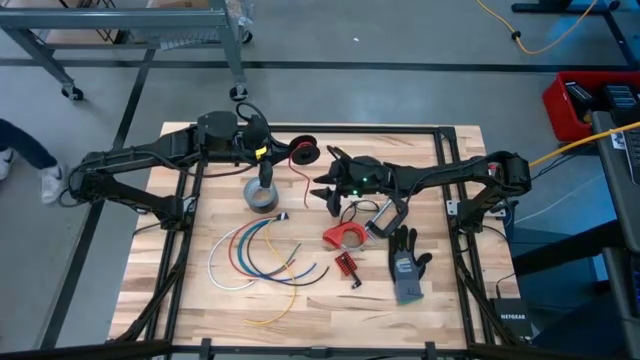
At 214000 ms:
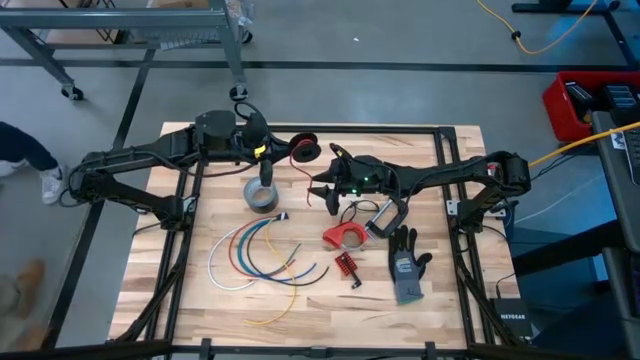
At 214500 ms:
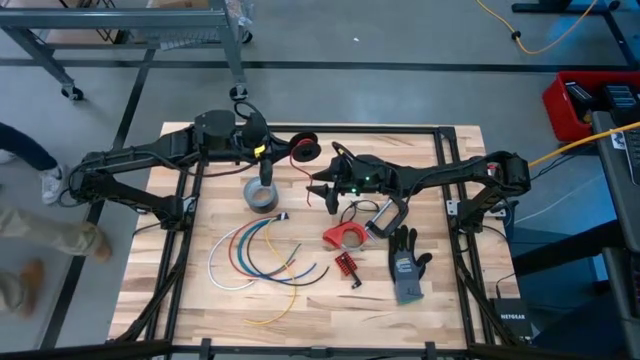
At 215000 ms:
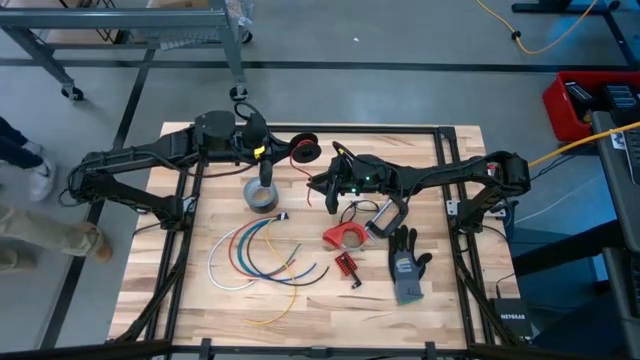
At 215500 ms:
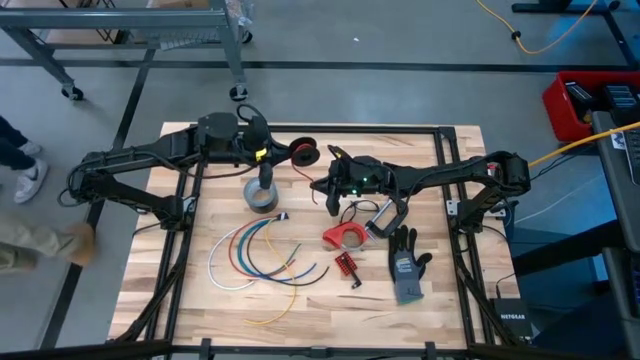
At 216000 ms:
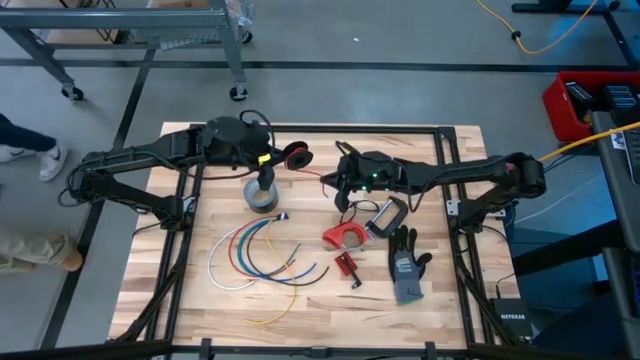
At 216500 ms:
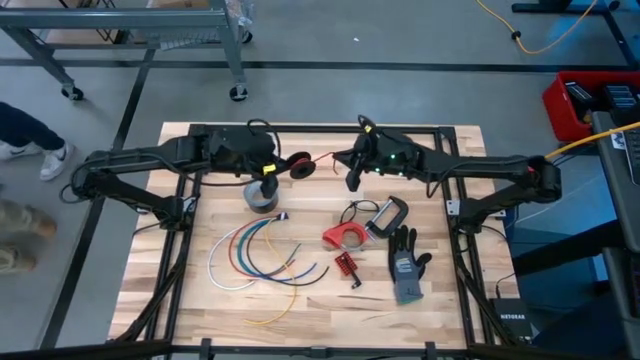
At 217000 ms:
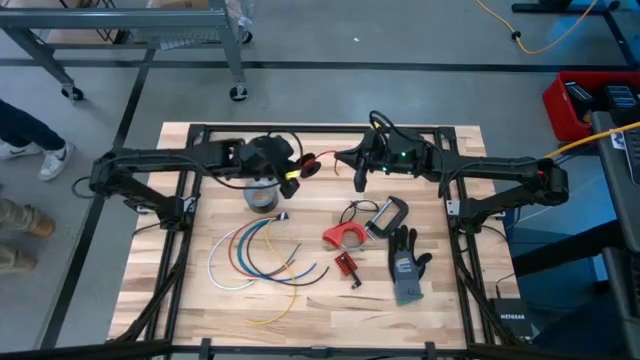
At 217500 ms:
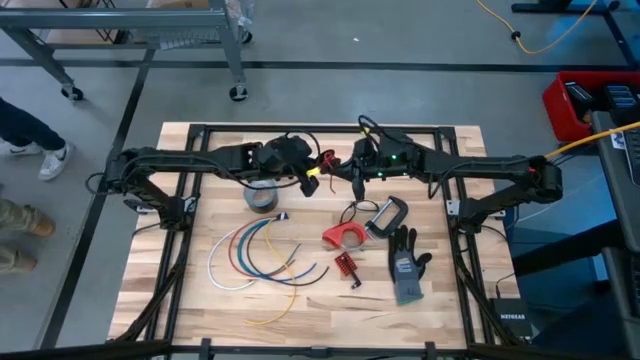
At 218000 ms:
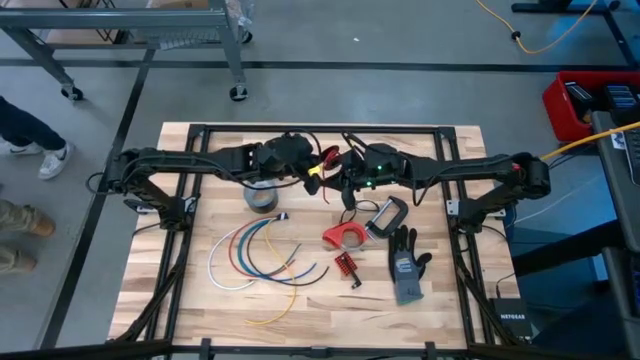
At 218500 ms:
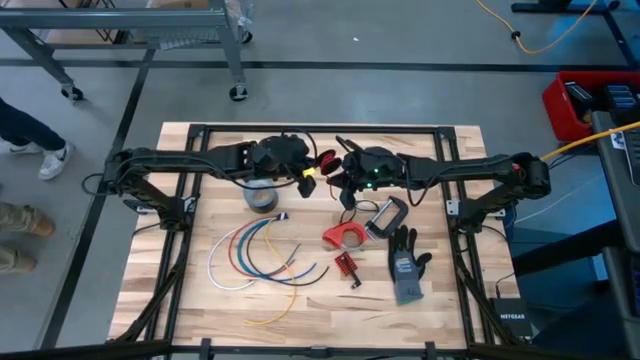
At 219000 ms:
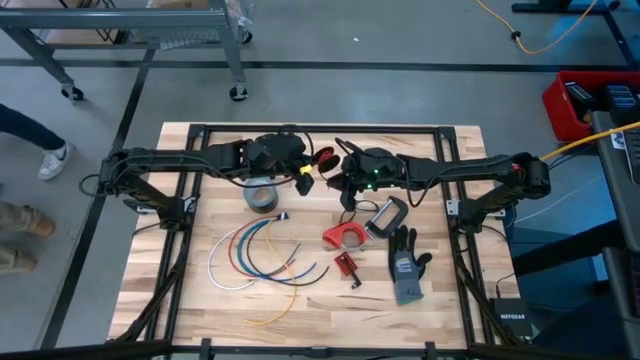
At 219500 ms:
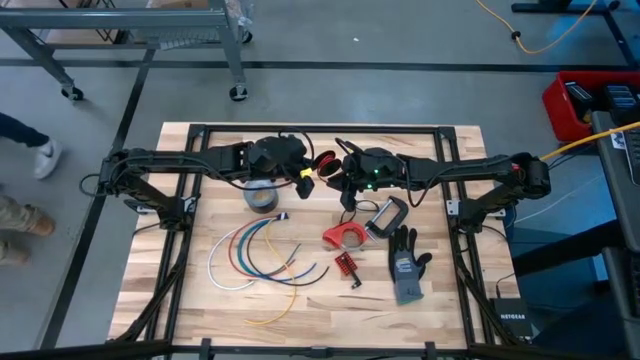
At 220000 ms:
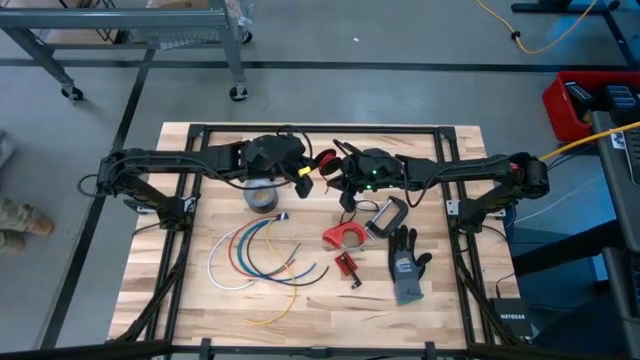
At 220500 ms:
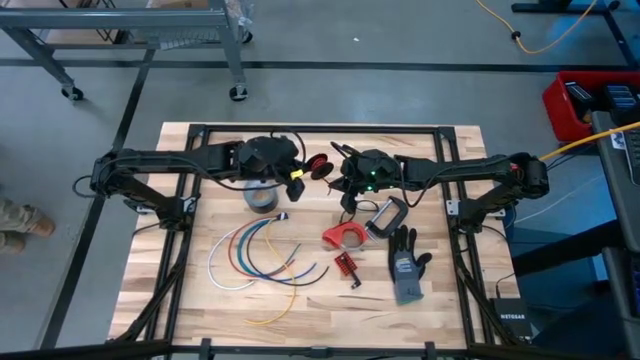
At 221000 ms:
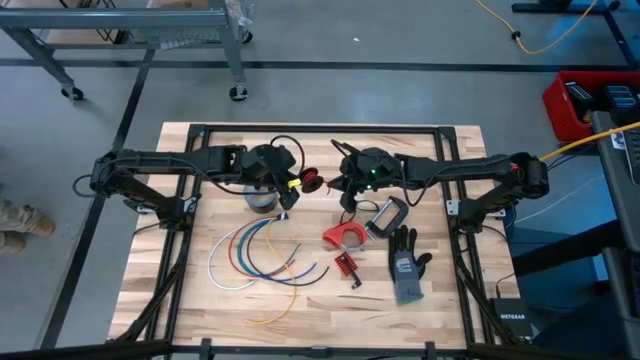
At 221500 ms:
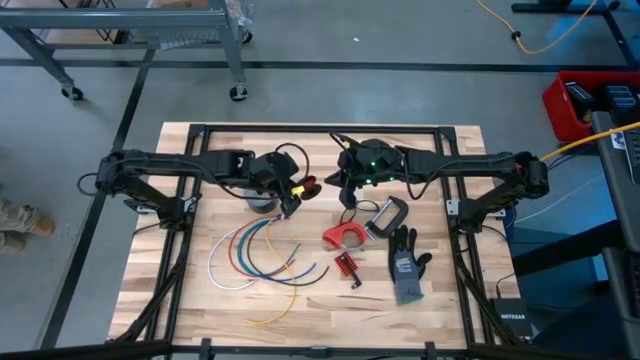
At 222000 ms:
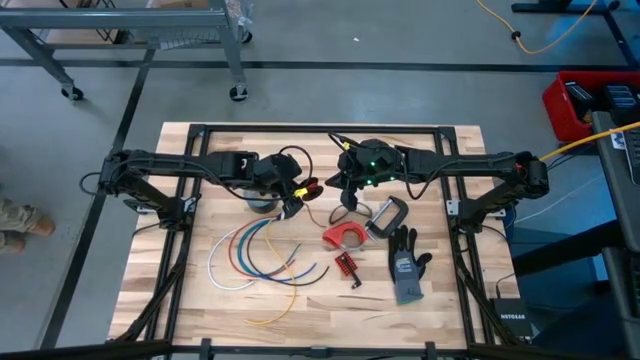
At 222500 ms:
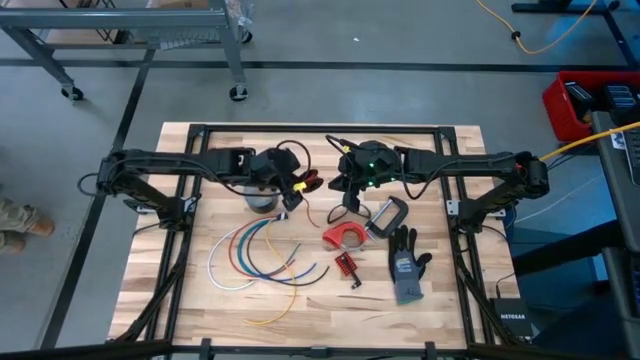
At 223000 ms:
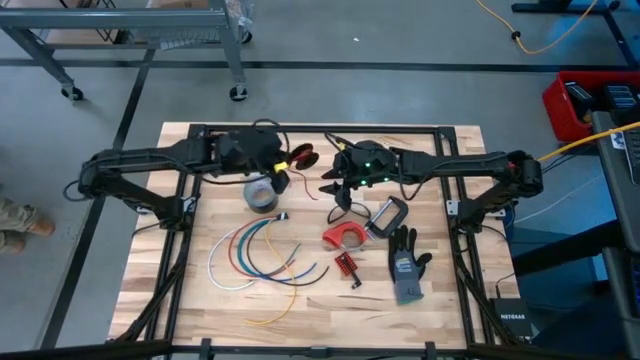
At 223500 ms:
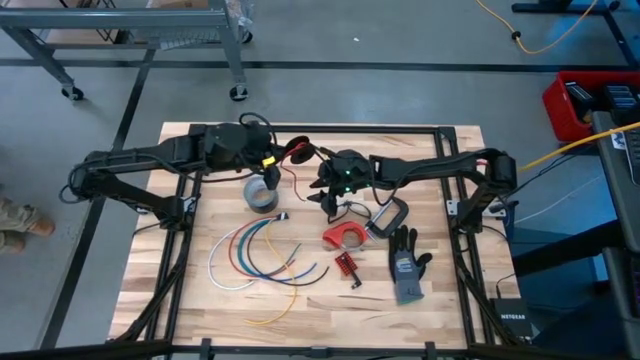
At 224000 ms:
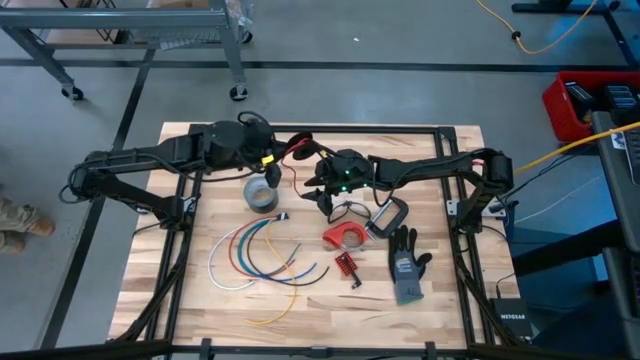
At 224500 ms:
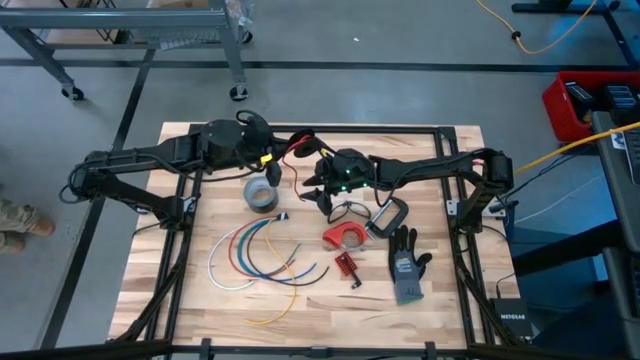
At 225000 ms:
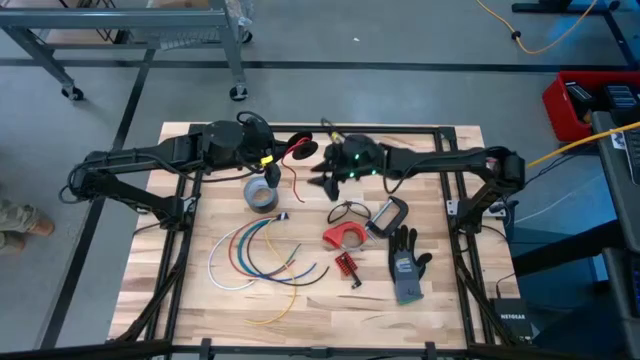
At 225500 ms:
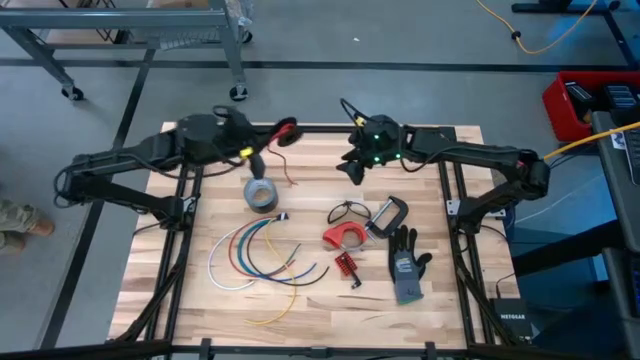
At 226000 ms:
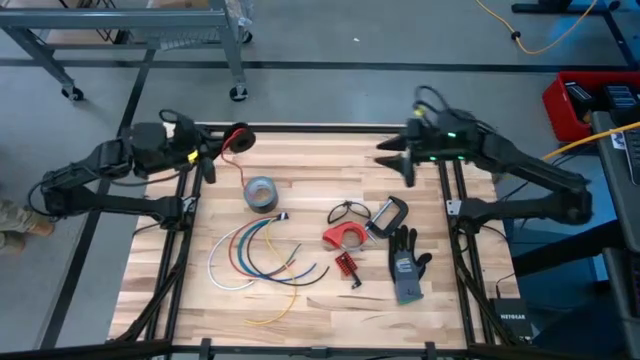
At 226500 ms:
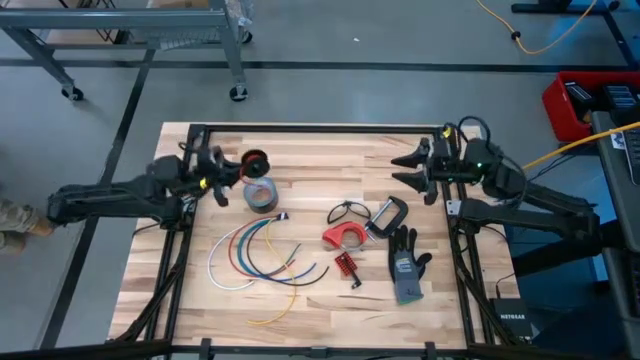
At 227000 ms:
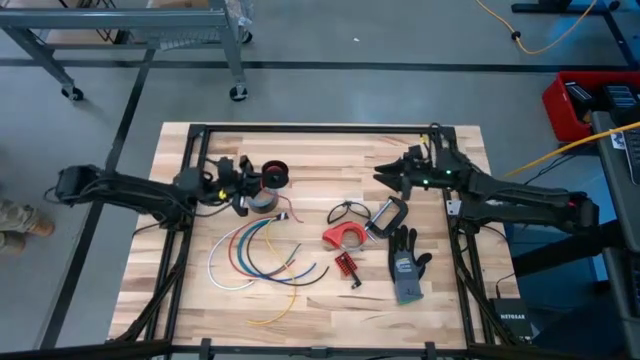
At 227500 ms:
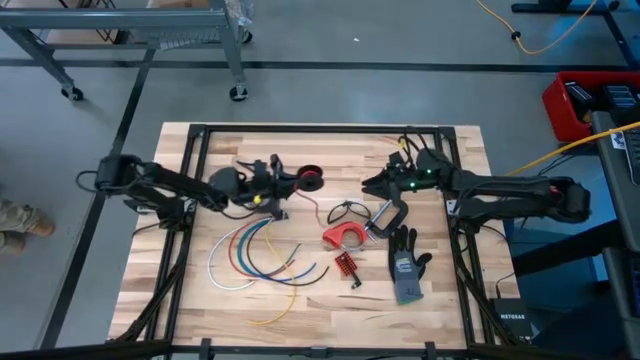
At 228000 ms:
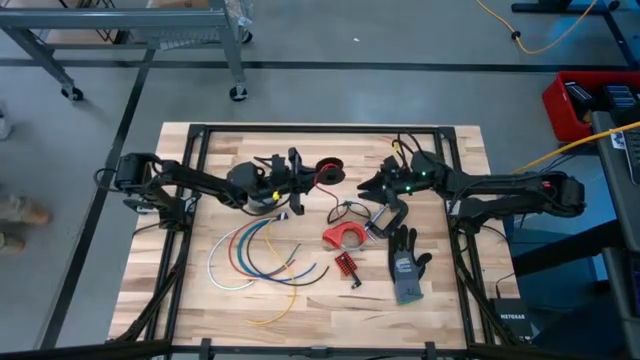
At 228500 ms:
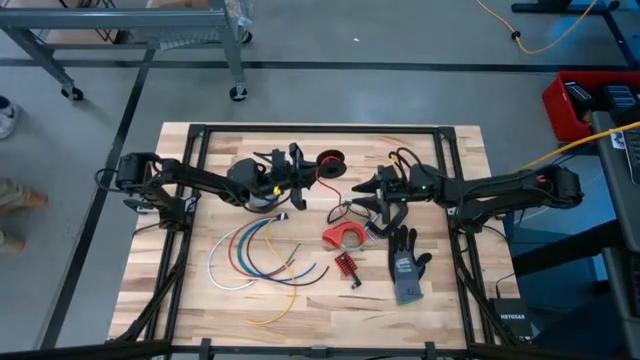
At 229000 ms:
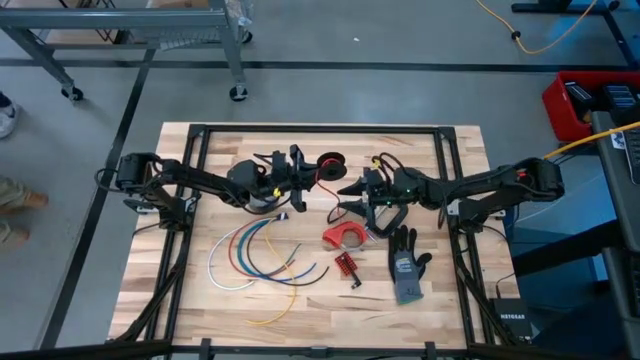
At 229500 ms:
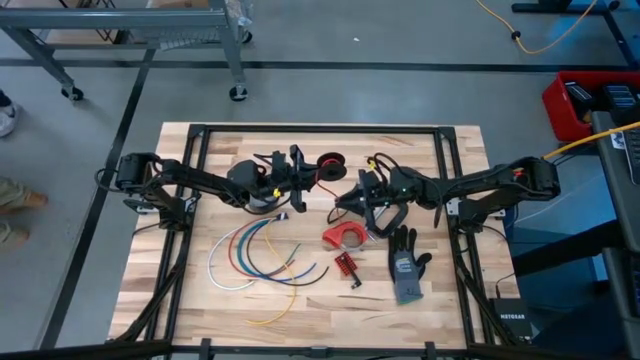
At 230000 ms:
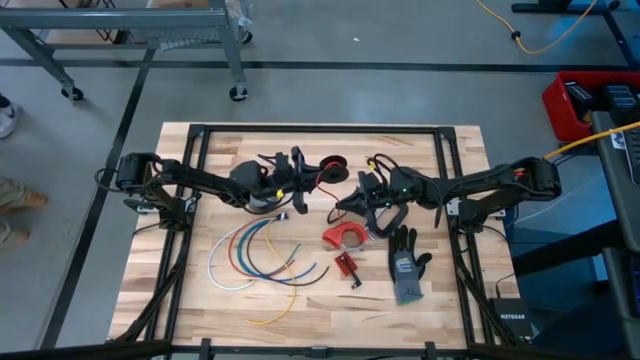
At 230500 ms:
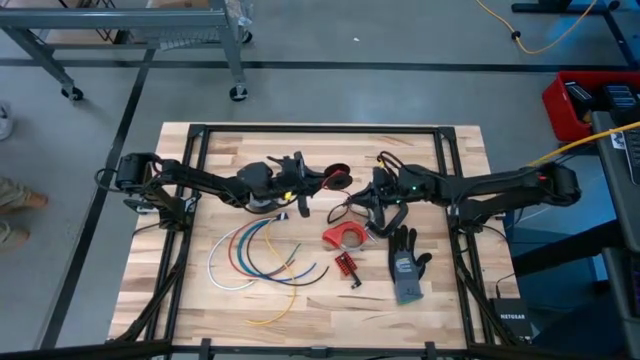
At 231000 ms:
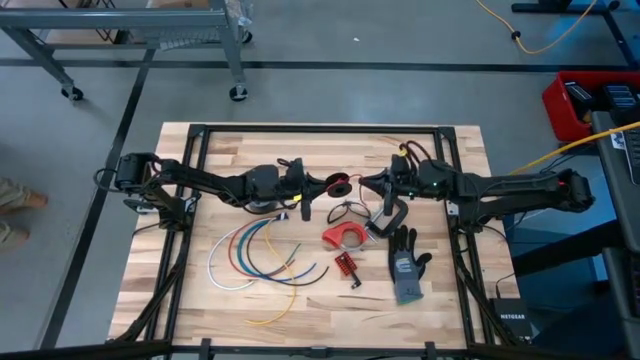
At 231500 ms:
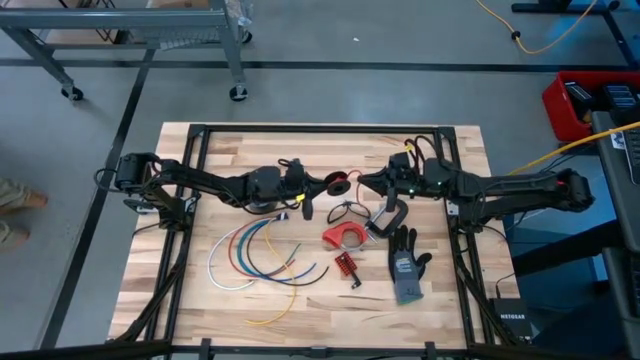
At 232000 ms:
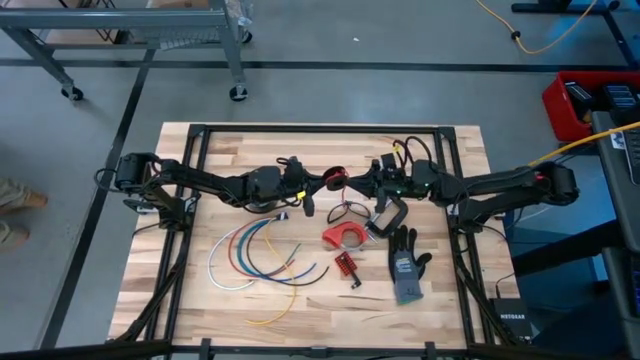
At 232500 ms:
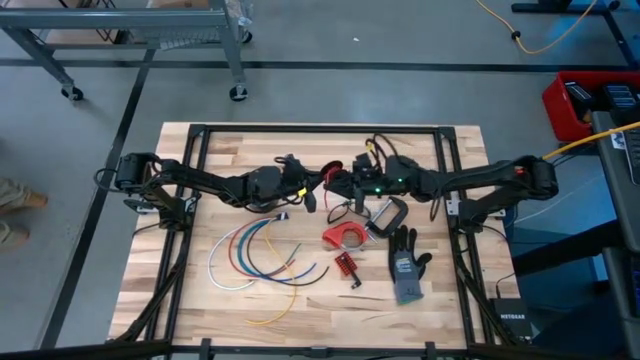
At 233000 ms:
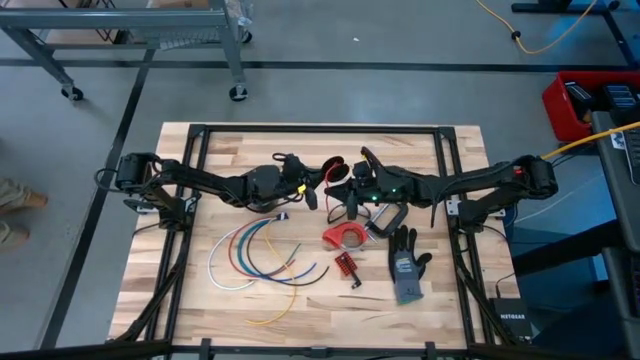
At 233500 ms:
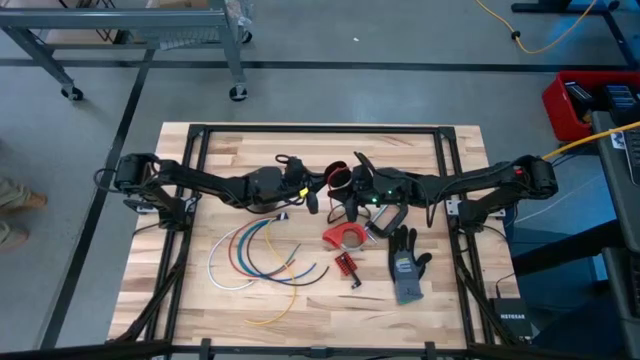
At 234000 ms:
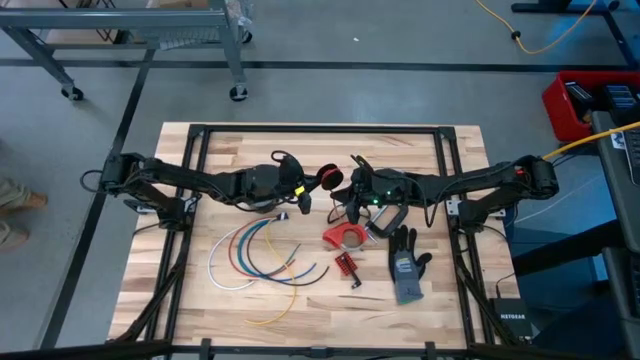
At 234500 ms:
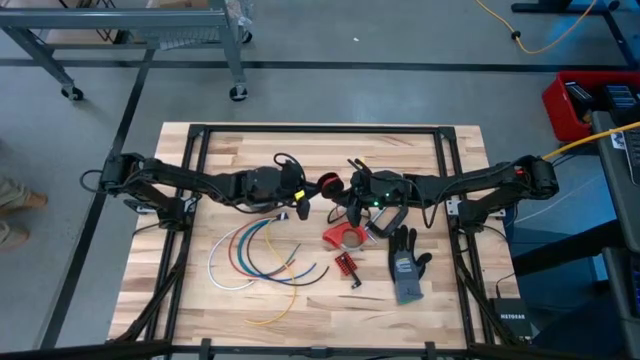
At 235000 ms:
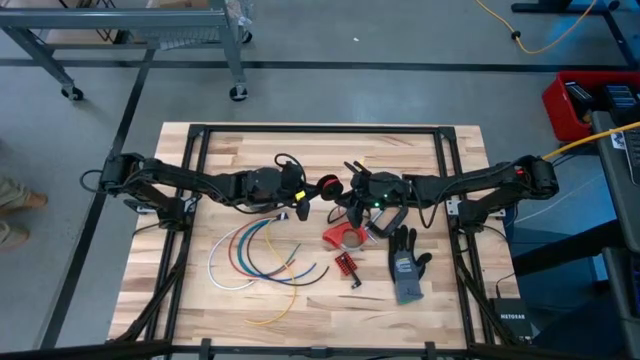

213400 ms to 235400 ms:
Task: Coil cords
Coil the red wire onto the spool
